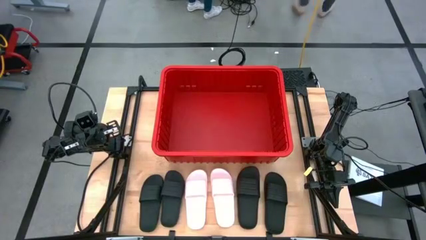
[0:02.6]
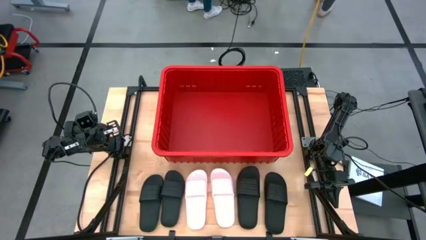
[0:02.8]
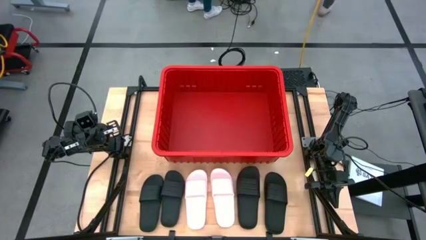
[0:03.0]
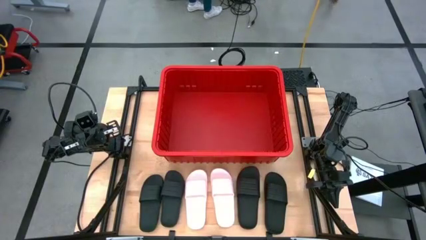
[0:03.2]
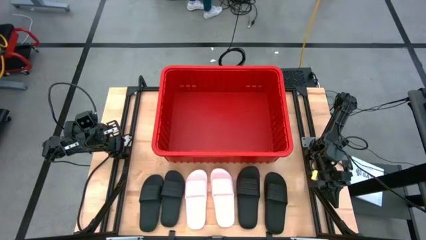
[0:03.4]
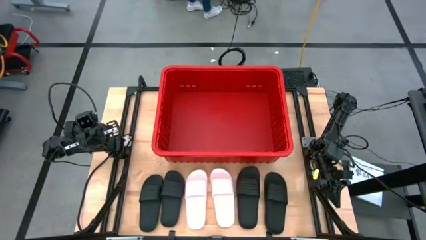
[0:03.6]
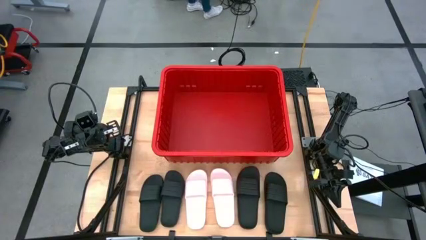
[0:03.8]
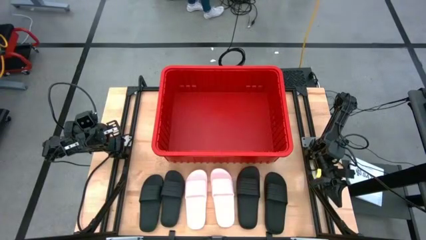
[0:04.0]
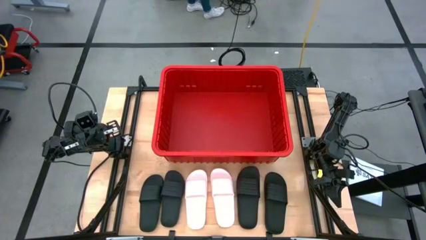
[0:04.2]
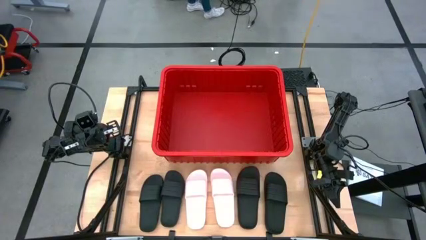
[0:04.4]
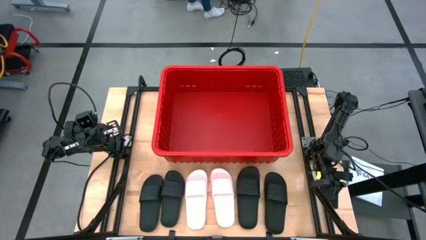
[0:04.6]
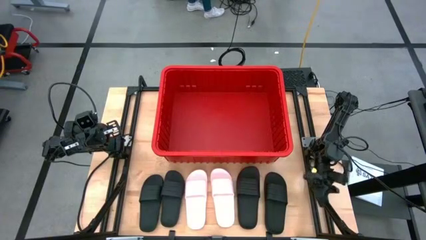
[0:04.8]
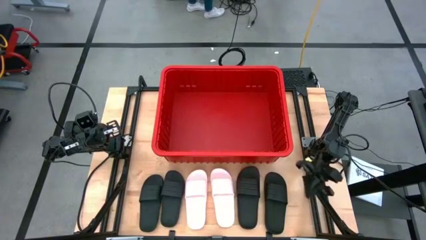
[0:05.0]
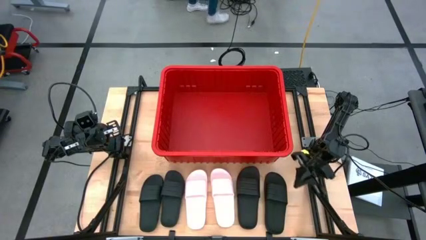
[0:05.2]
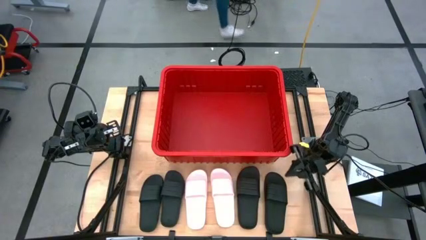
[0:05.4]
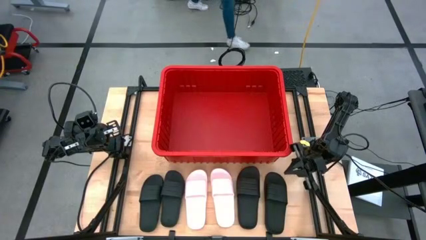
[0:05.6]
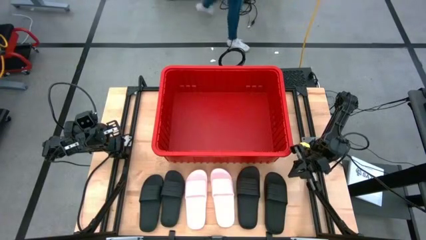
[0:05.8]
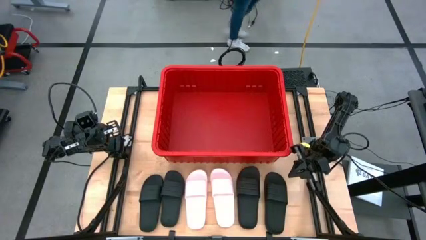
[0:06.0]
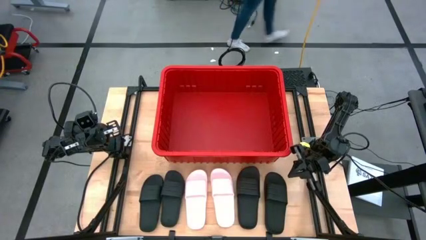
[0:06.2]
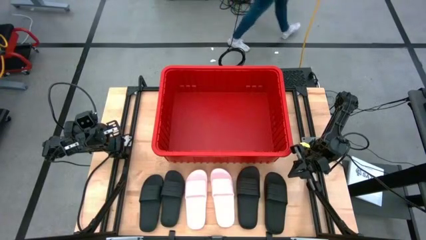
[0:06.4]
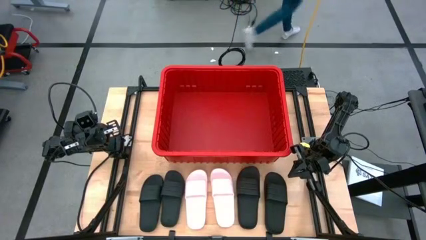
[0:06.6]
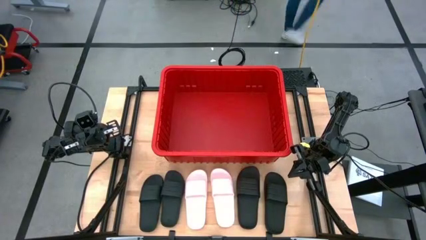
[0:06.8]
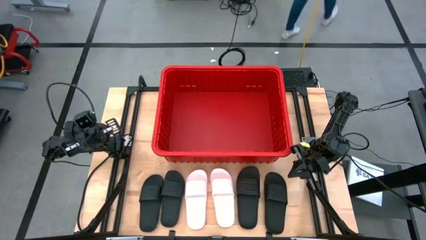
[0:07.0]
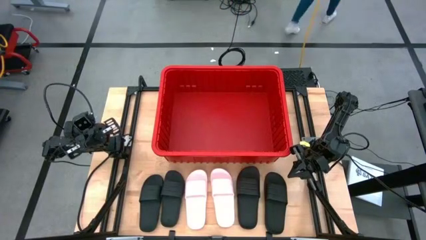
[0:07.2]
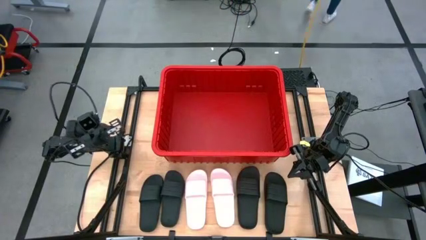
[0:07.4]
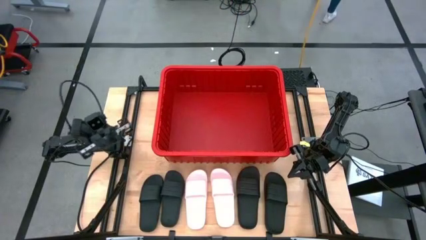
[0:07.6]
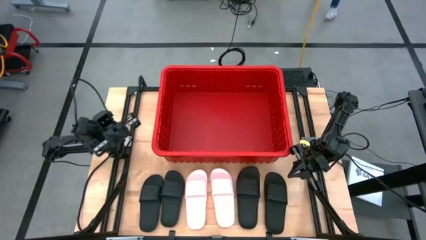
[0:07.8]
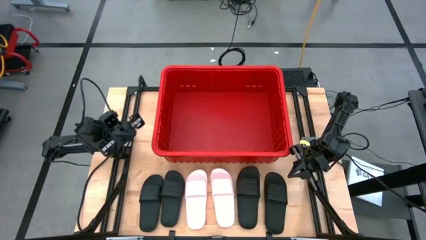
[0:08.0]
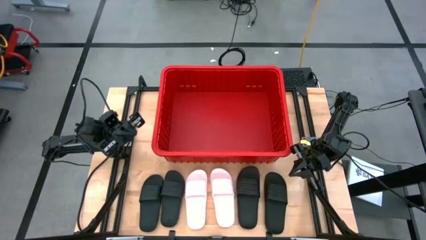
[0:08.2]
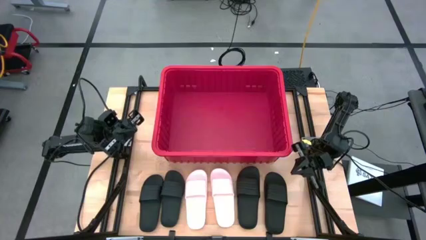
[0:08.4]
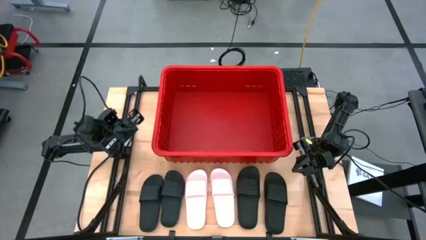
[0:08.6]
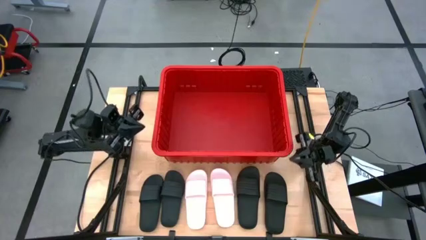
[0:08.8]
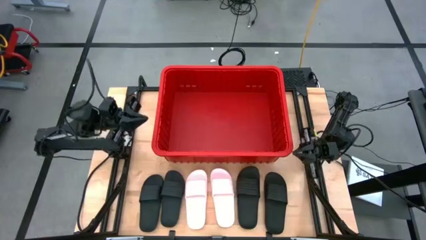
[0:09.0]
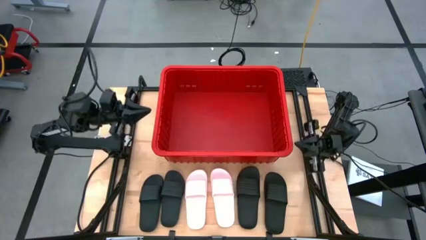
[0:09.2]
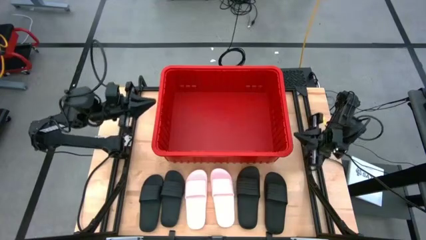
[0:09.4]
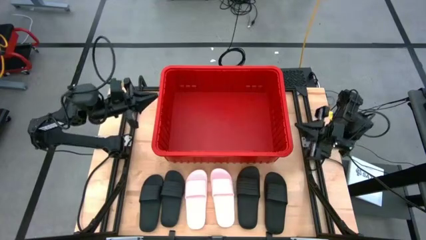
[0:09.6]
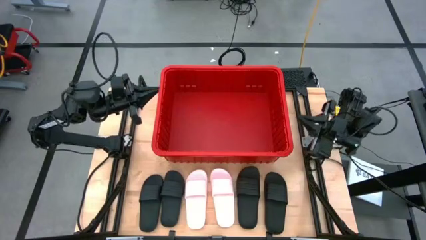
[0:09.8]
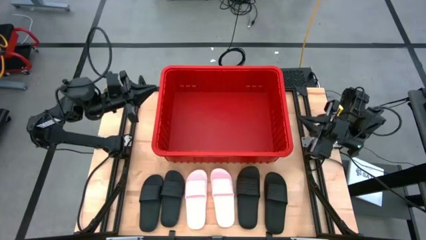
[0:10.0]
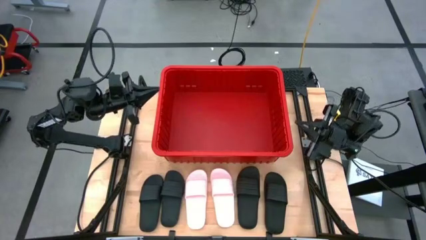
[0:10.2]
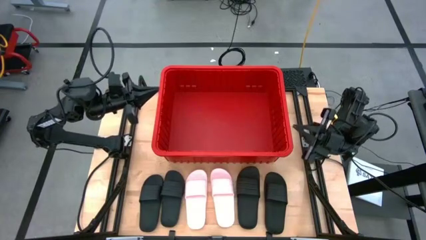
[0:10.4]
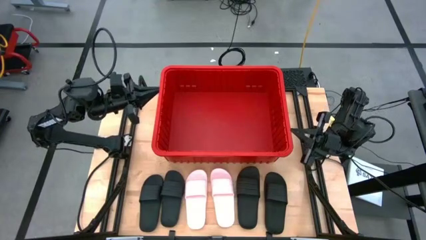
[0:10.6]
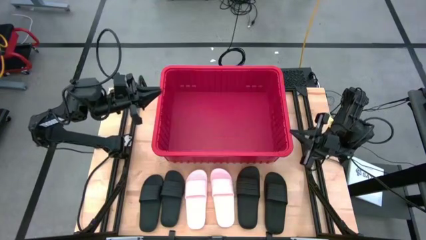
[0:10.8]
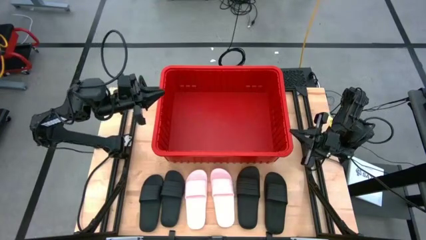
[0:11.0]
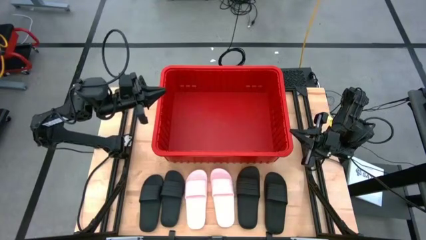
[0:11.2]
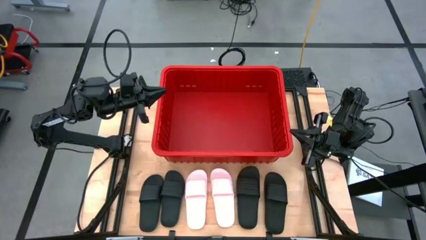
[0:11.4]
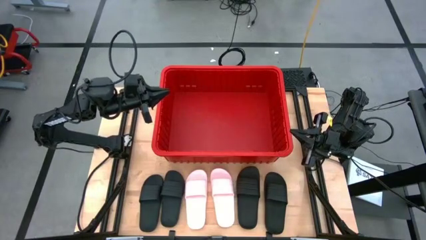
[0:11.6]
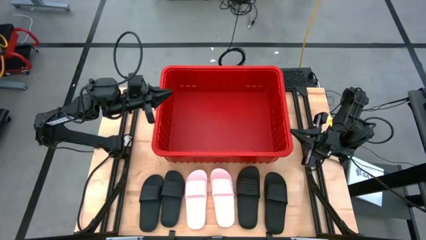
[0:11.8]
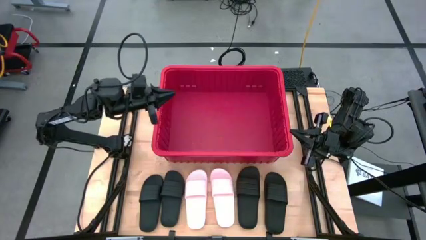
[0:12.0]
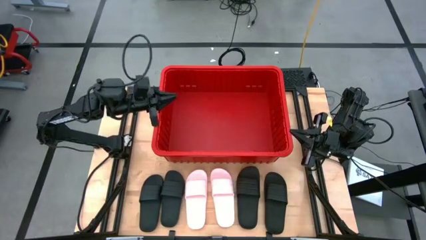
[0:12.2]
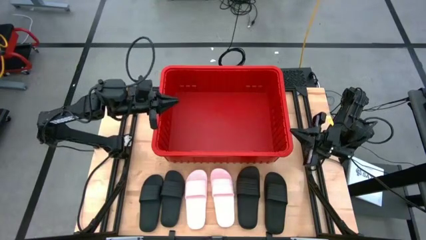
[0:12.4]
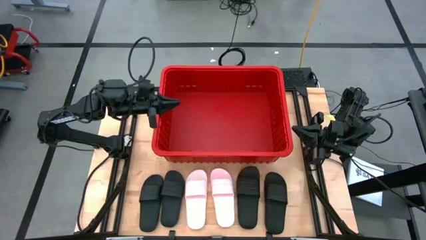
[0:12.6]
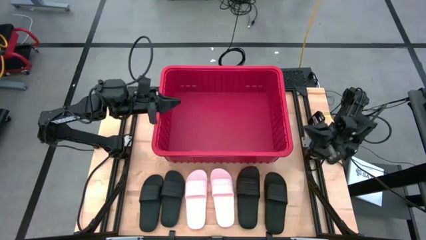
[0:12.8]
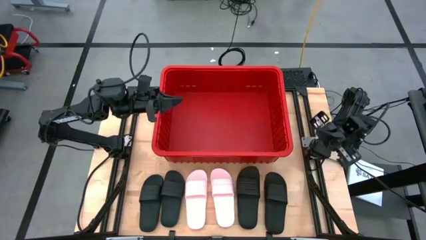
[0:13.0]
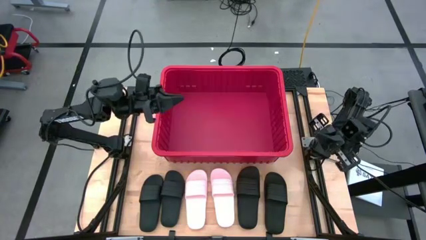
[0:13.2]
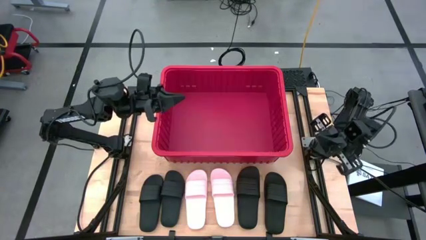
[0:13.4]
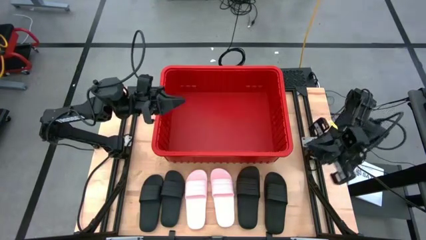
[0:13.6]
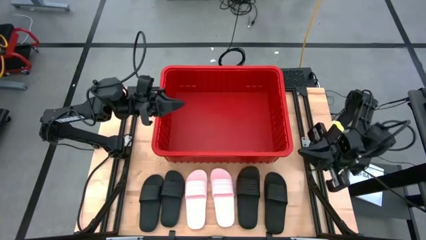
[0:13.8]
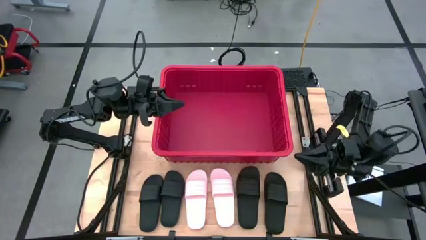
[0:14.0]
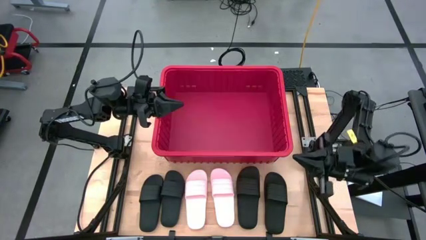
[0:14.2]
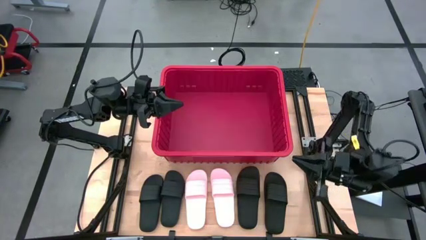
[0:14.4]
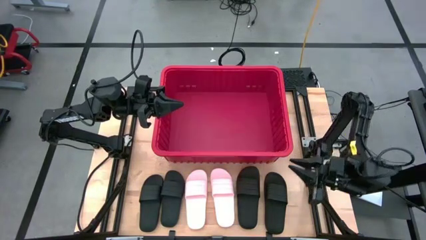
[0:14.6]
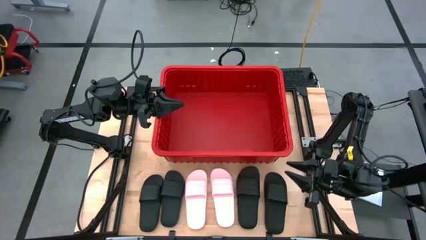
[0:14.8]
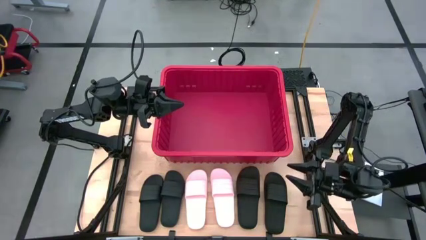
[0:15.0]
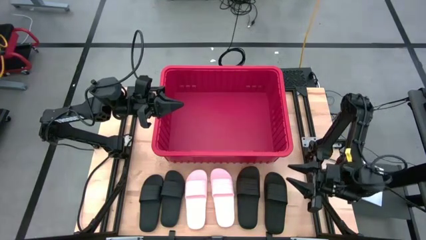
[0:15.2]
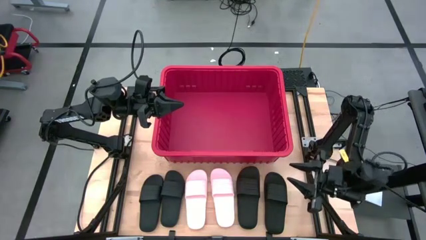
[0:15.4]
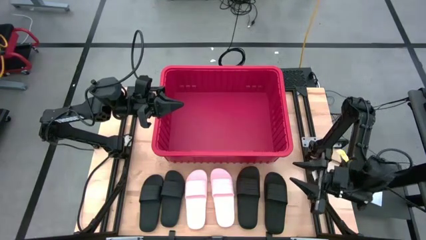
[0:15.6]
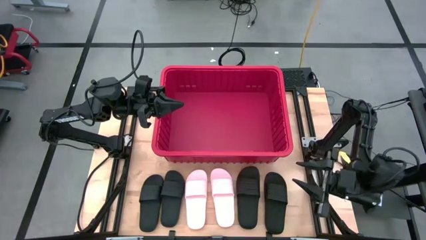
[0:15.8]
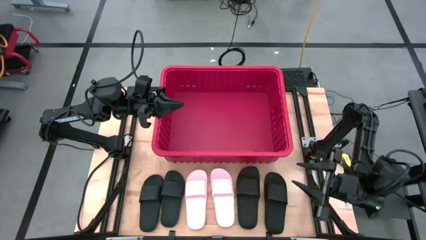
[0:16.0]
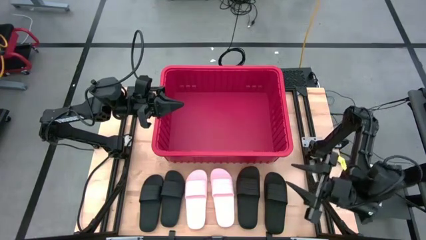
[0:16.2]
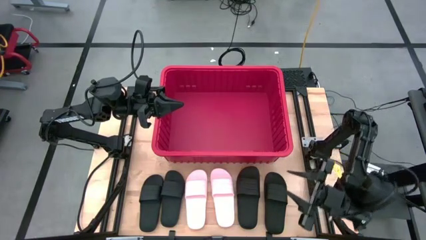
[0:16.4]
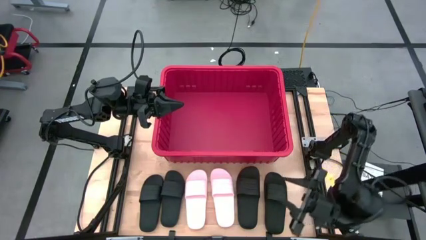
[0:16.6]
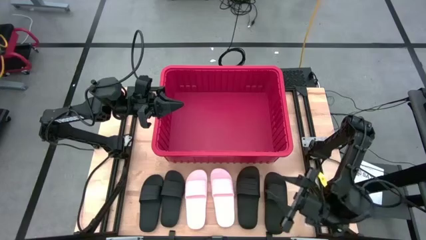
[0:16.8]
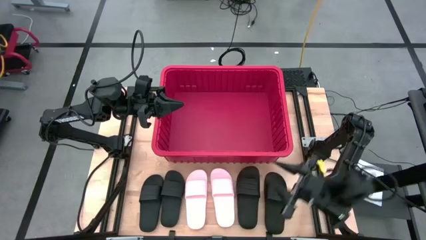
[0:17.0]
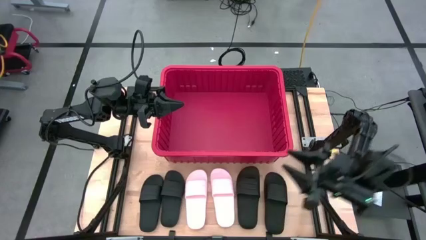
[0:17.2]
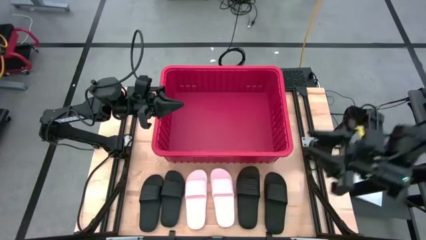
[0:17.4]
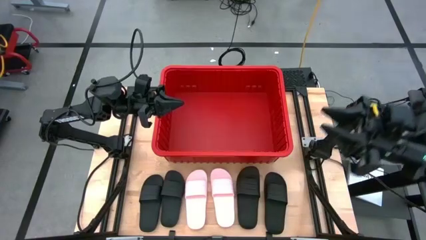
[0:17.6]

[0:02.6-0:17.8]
Task: Pick and place slides into bin
Put the black slide into the red organizer bin
